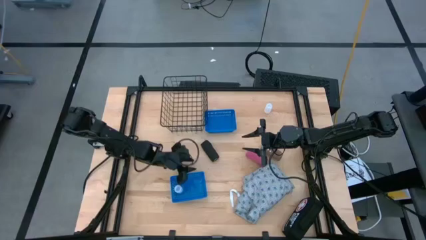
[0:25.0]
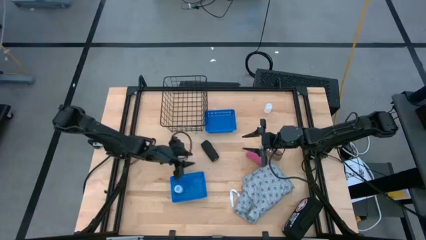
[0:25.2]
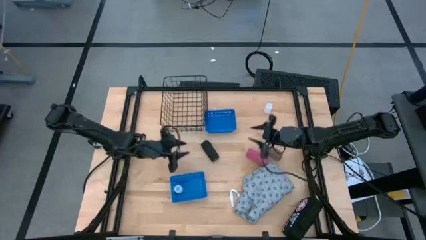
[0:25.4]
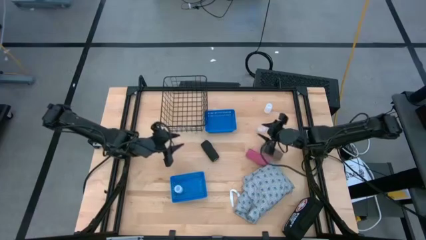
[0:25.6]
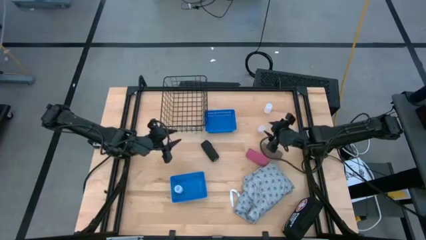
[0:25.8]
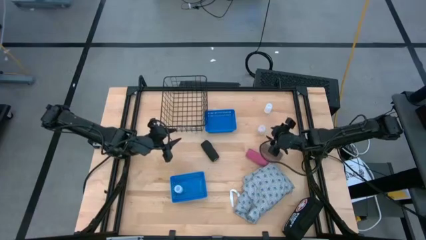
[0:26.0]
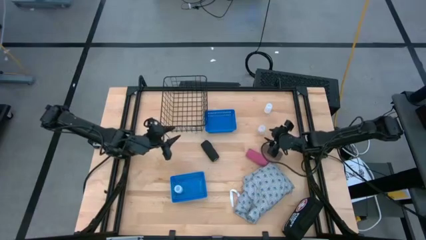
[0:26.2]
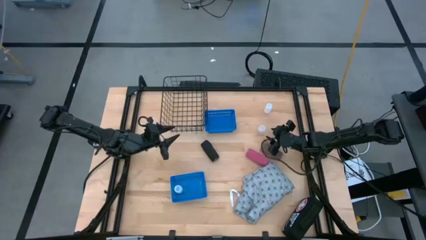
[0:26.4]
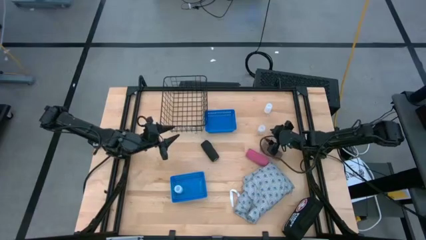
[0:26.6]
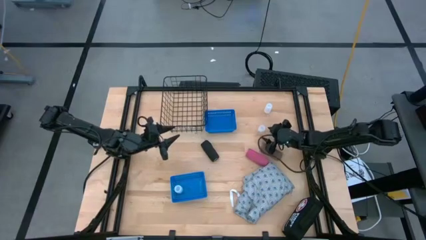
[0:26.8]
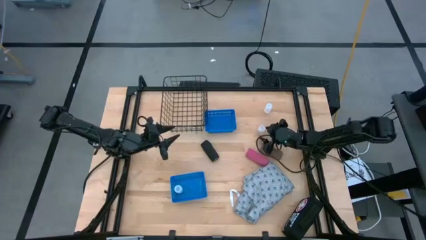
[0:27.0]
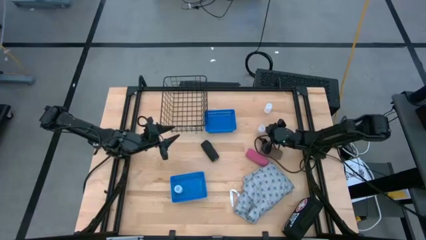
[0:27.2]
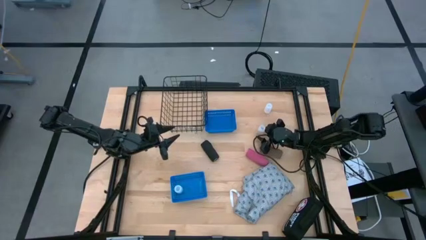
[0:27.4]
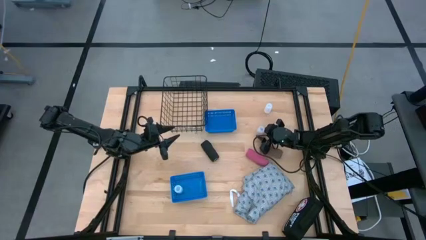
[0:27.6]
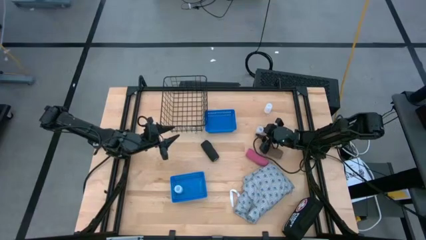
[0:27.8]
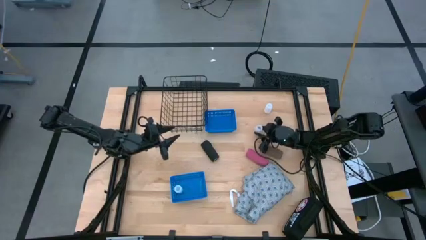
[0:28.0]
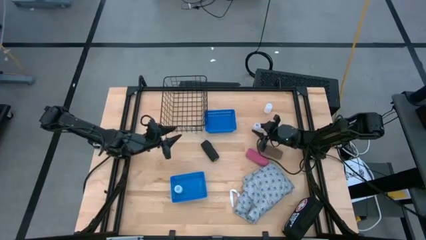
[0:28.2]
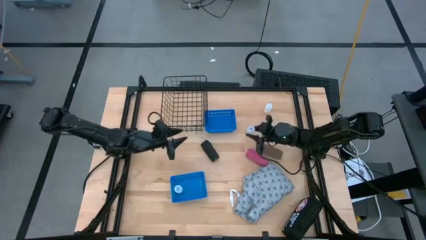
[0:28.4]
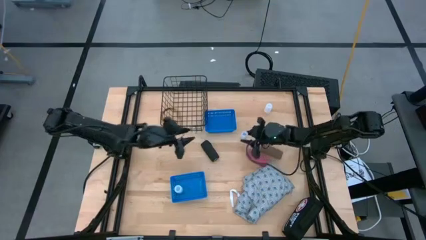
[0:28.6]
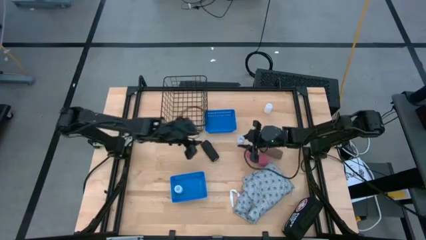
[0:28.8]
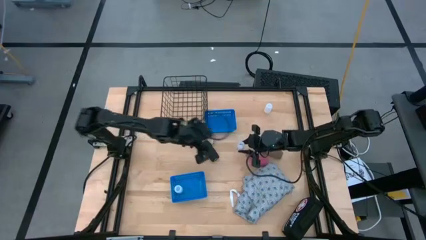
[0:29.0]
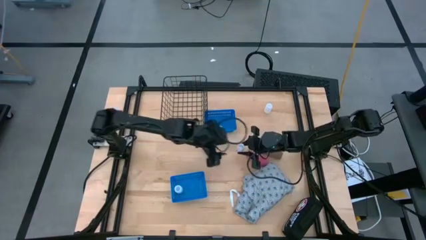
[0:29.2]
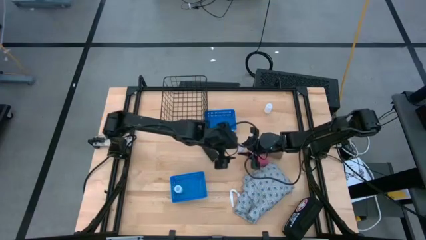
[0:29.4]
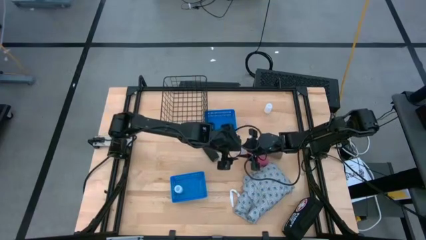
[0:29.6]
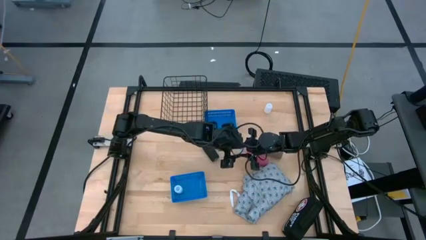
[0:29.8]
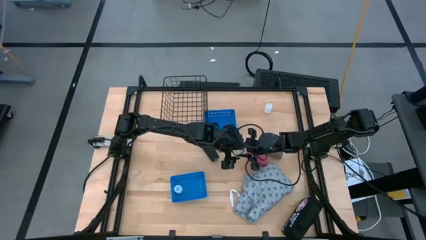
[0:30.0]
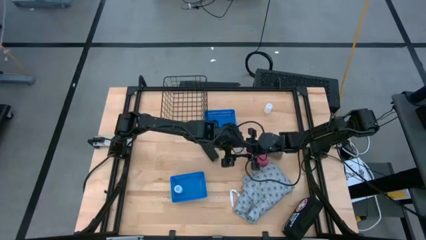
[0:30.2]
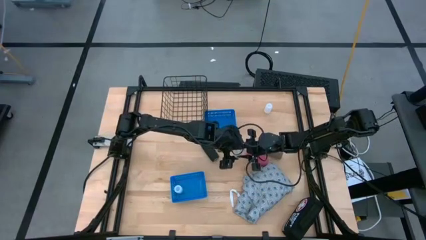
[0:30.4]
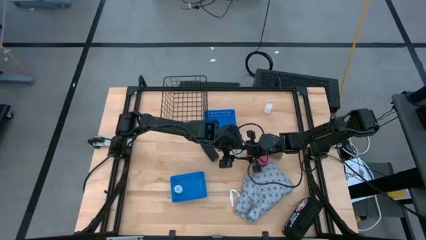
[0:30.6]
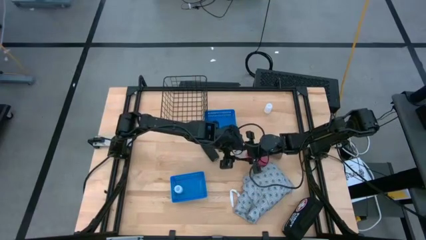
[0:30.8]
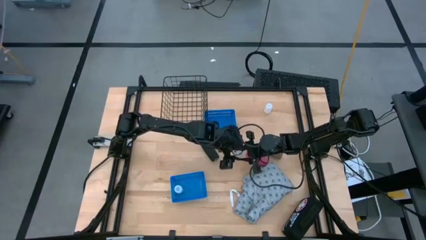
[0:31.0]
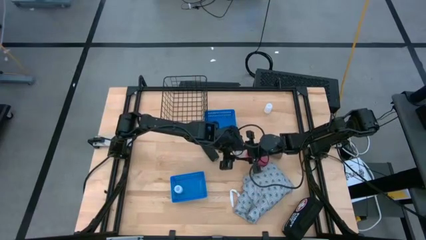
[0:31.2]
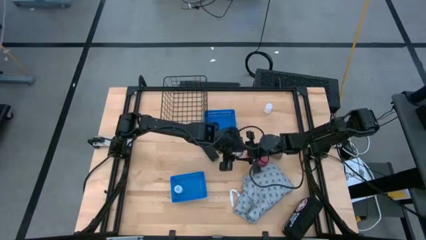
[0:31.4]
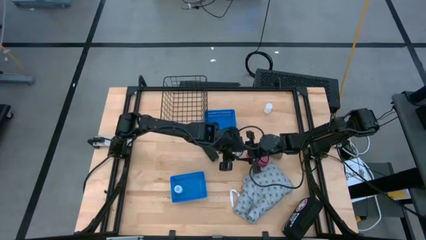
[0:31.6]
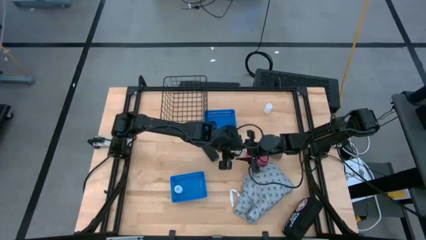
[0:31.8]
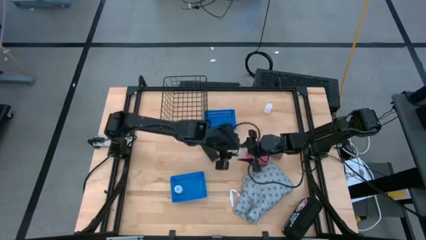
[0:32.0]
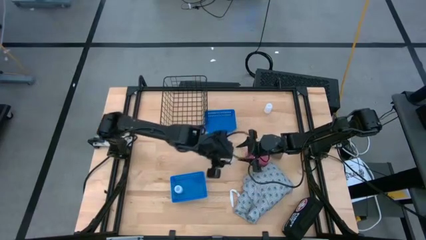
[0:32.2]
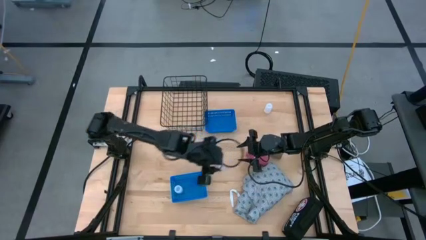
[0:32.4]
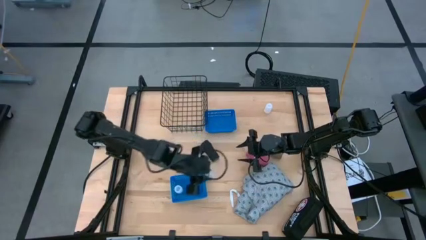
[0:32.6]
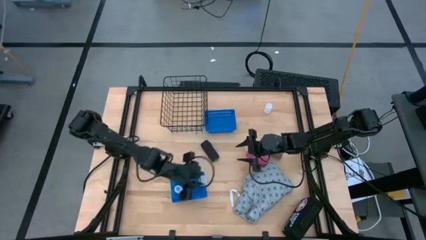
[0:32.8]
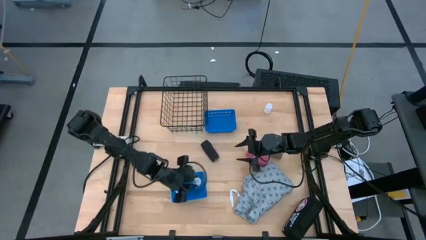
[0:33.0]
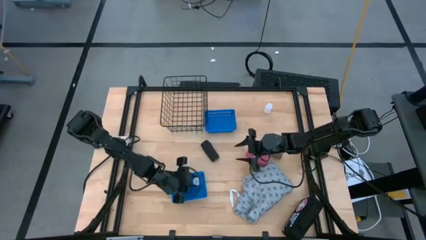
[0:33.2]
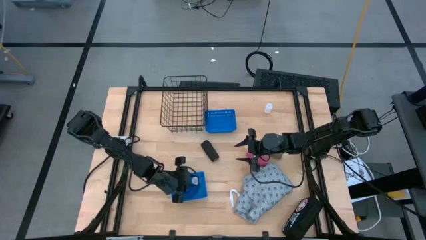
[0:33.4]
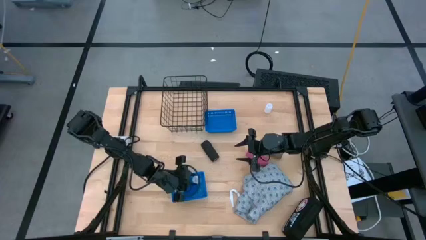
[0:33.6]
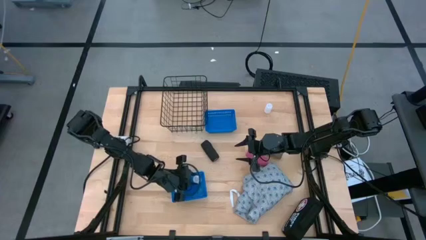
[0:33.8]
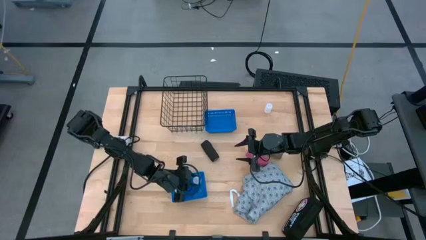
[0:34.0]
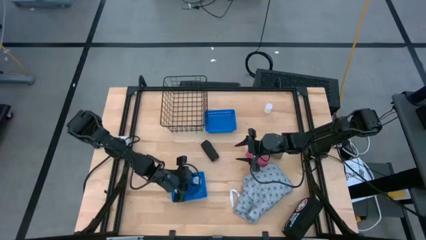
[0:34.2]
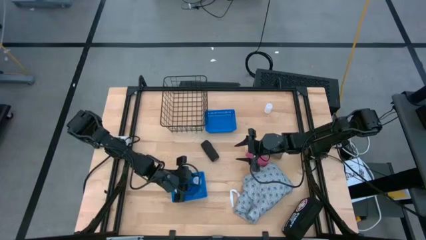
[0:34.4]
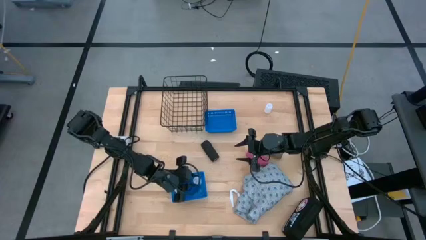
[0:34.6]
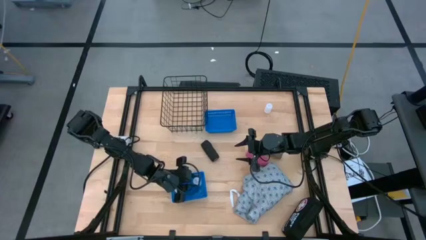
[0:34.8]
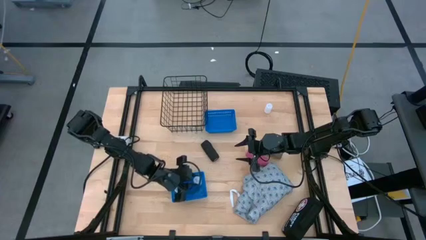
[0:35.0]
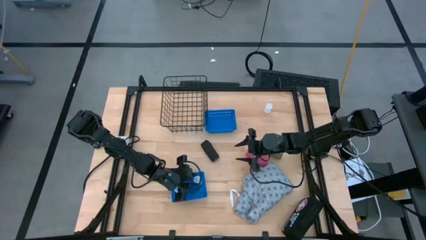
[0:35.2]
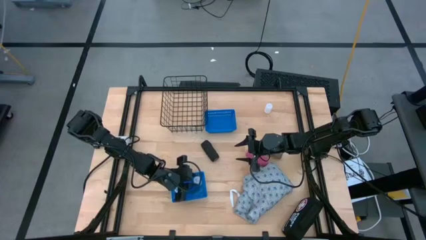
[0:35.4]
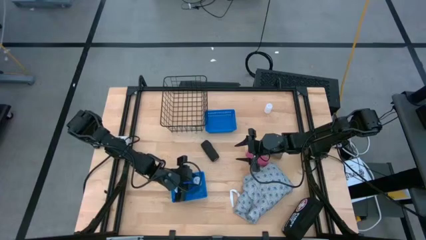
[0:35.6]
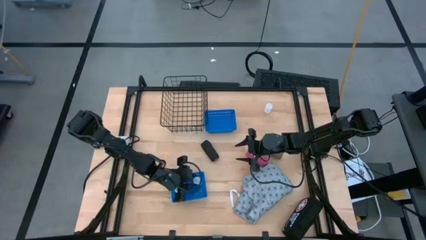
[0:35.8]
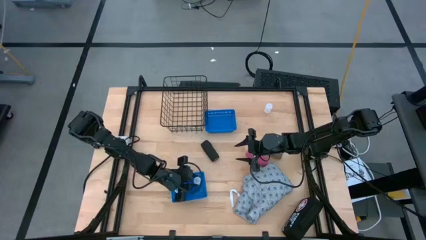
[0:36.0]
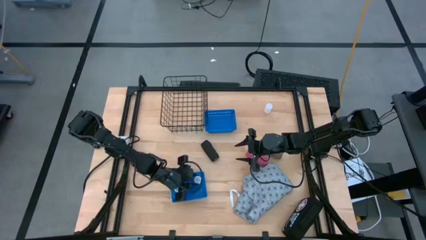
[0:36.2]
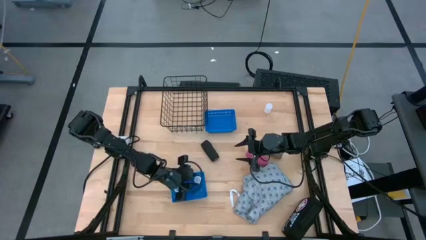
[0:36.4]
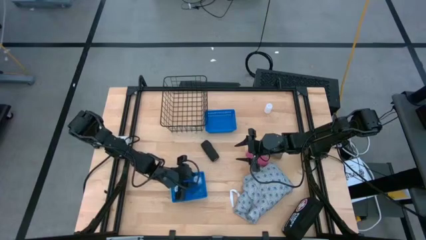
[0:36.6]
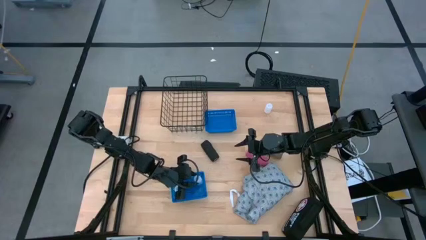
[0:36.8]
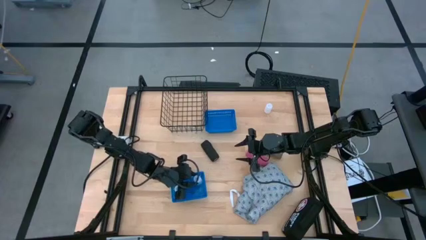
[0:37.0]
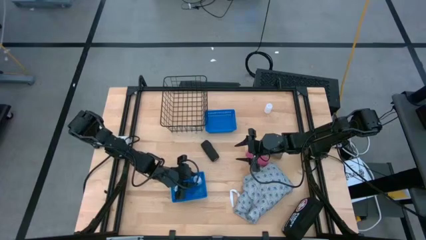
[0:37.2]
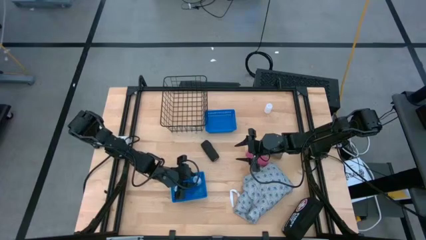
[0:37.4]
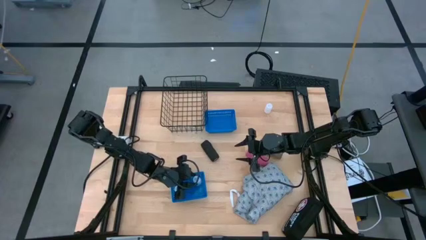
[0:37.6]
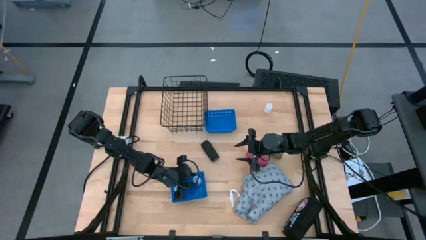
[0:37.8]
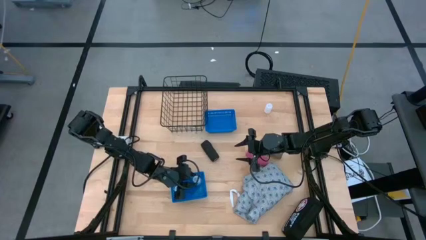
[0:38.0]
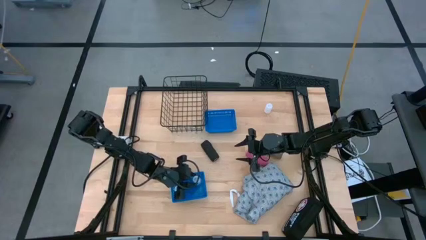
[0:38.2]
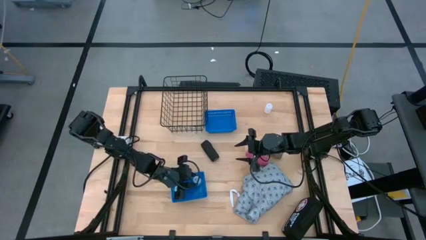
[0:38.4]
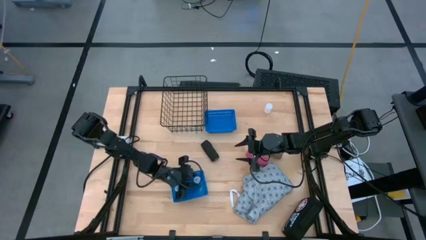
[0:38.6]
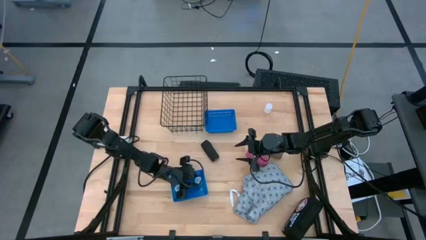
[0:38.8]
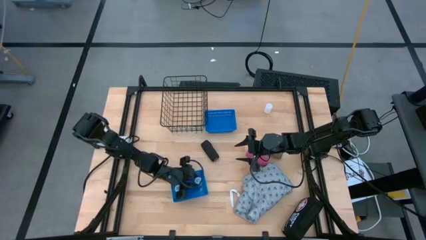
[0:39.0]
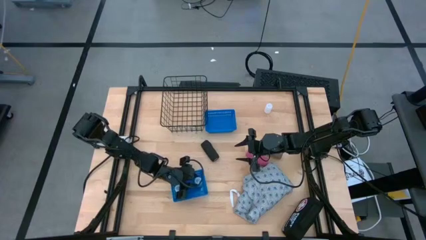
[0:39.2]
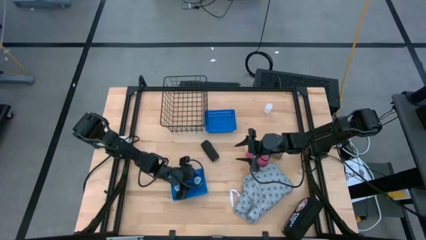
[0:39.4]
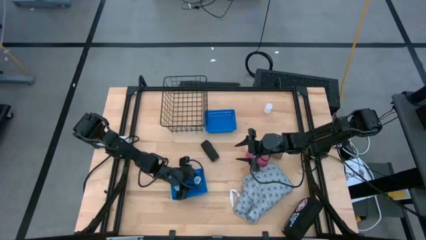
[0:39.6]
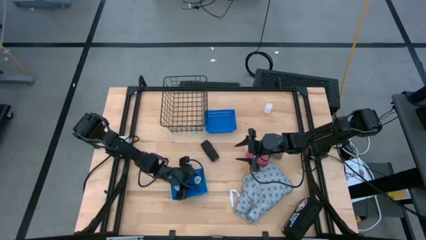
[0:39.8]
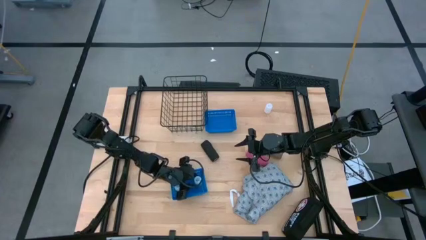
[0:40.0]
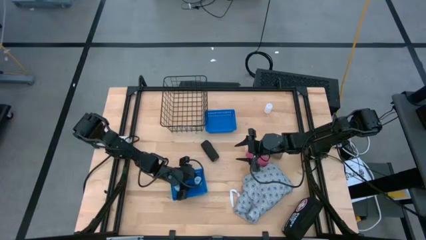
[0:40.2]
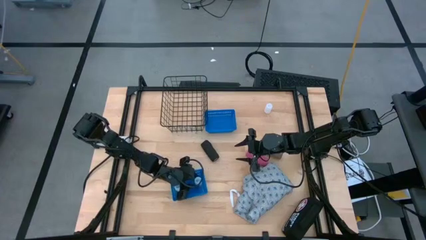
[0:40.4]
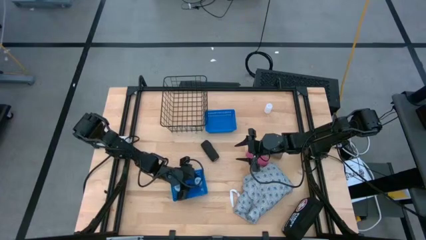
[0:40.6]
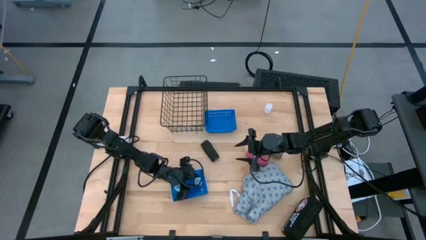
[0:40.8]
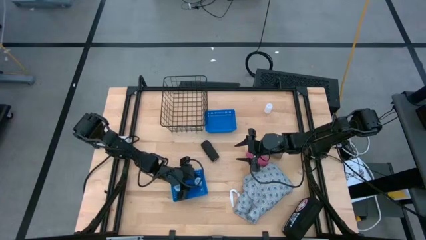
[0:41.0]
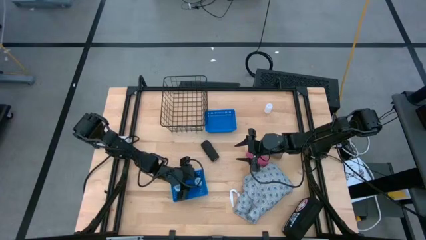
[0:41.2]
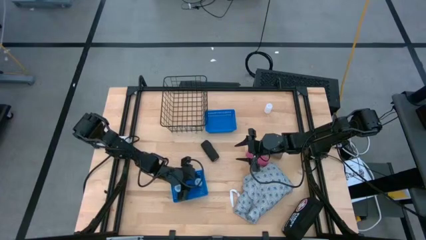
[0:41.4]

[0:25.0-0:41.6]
Task: Pick & Place Medicine items
Put the bottom white medicine bottles into the bottom blue basket
